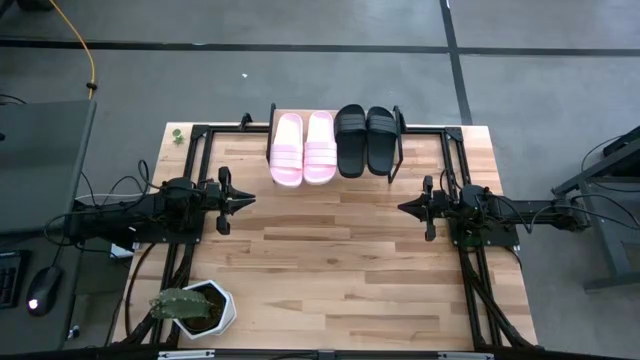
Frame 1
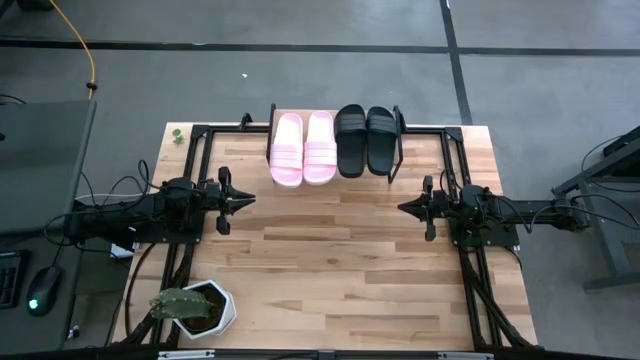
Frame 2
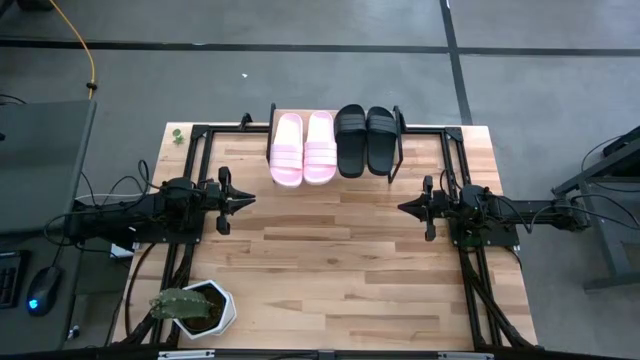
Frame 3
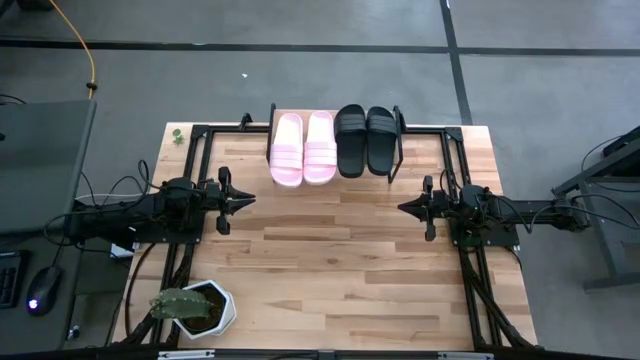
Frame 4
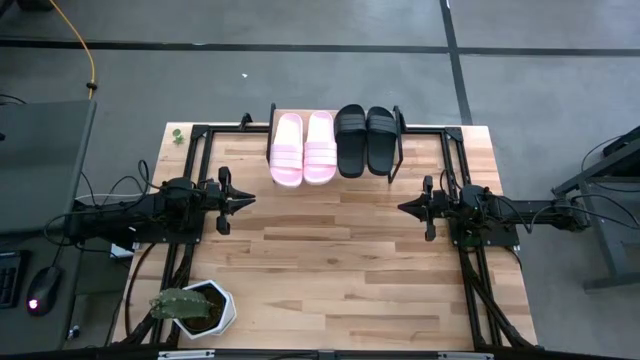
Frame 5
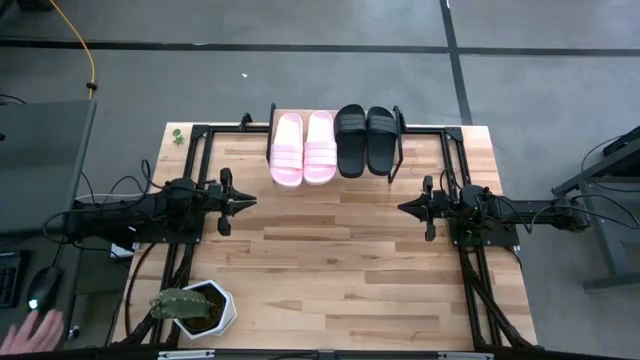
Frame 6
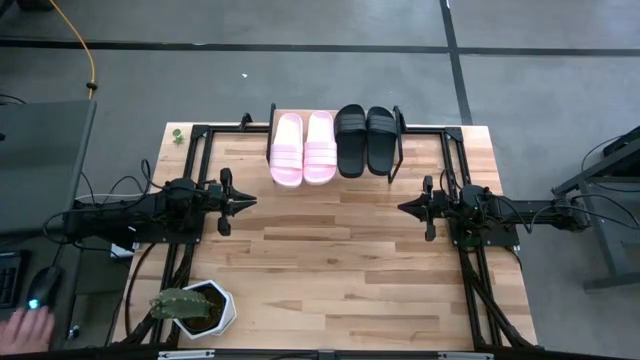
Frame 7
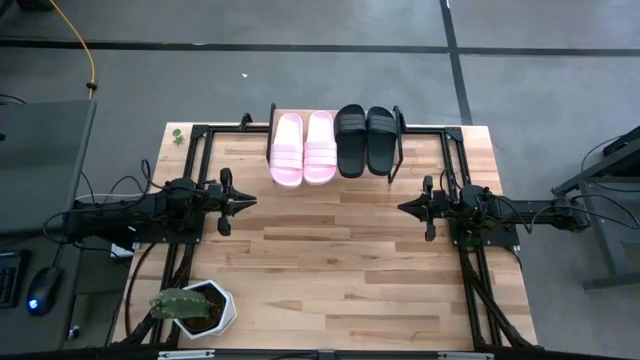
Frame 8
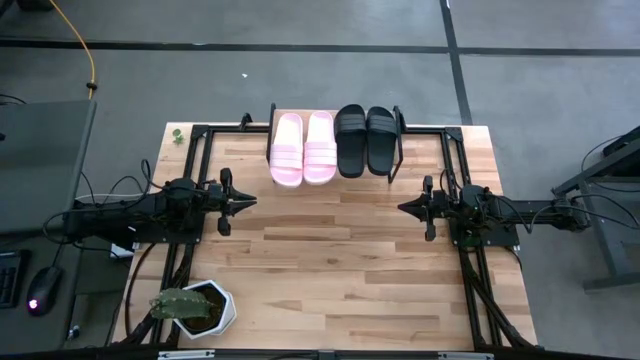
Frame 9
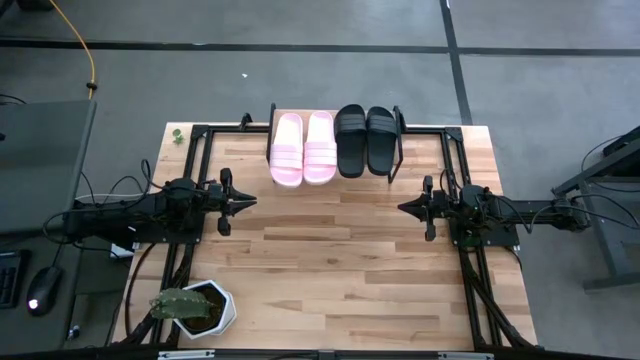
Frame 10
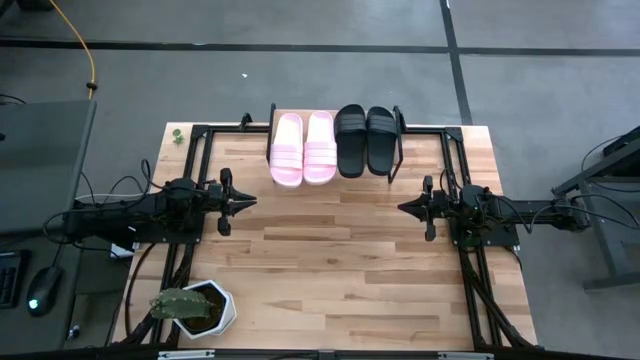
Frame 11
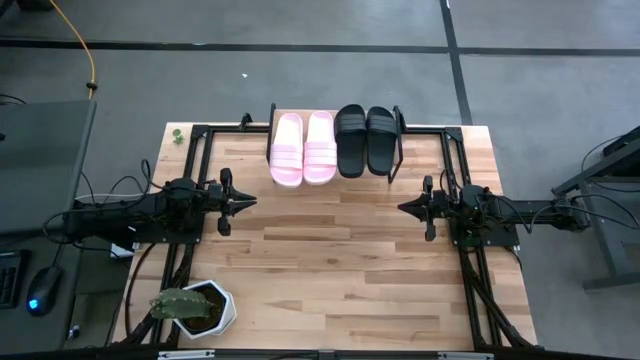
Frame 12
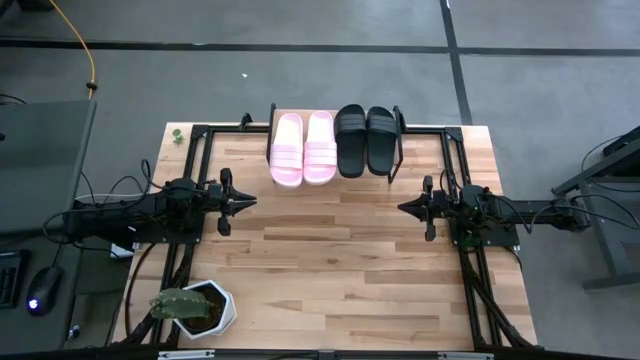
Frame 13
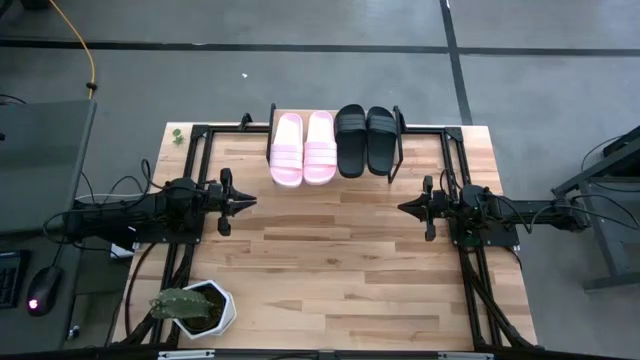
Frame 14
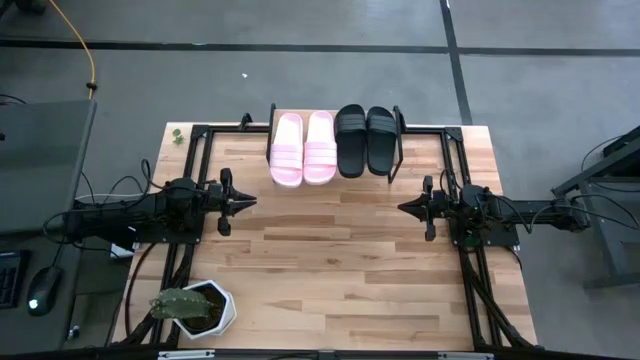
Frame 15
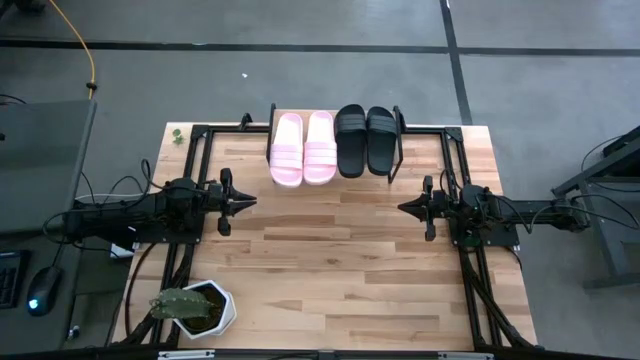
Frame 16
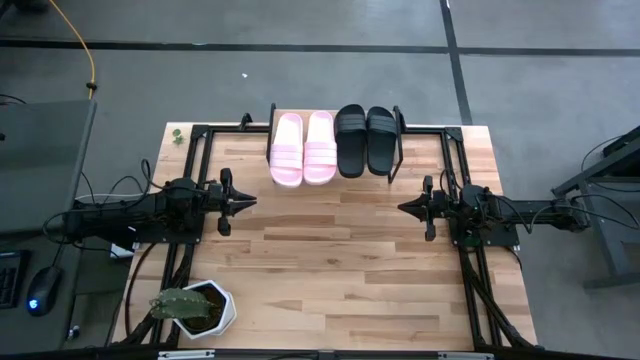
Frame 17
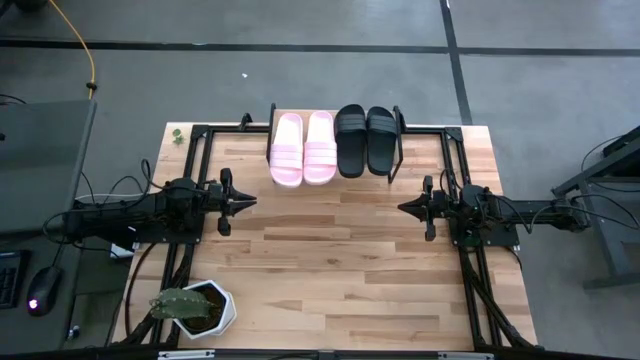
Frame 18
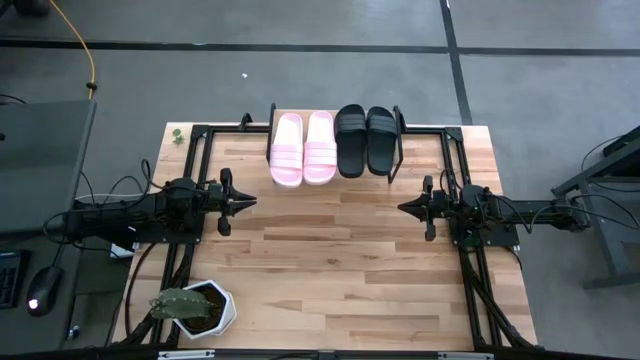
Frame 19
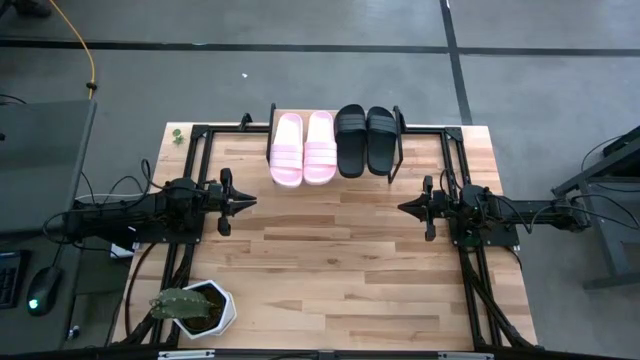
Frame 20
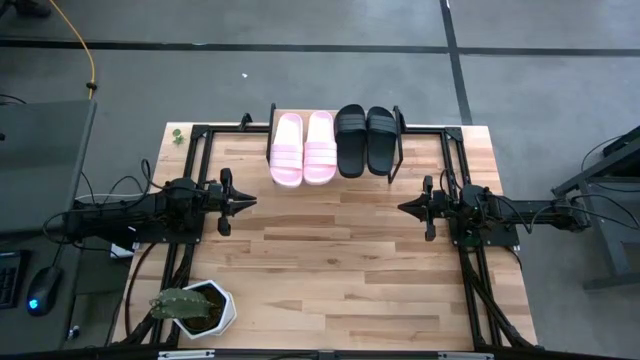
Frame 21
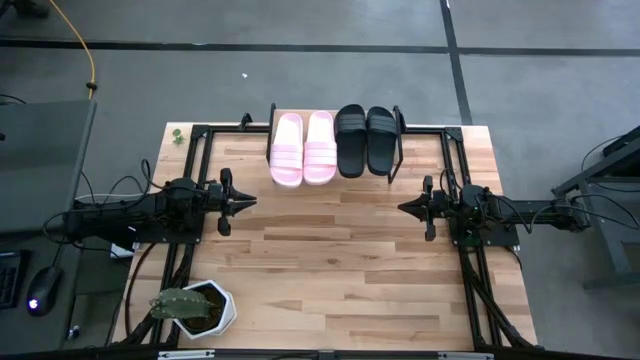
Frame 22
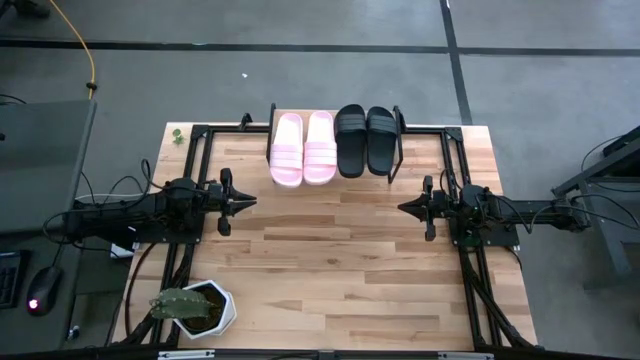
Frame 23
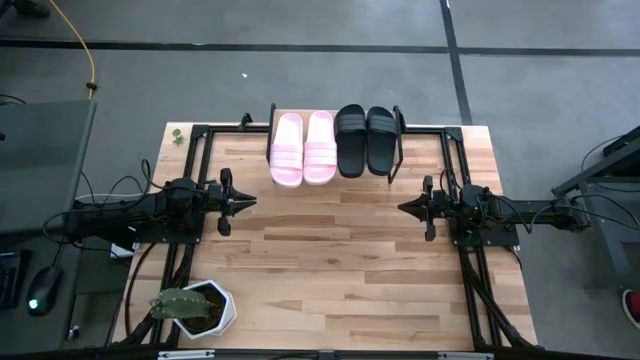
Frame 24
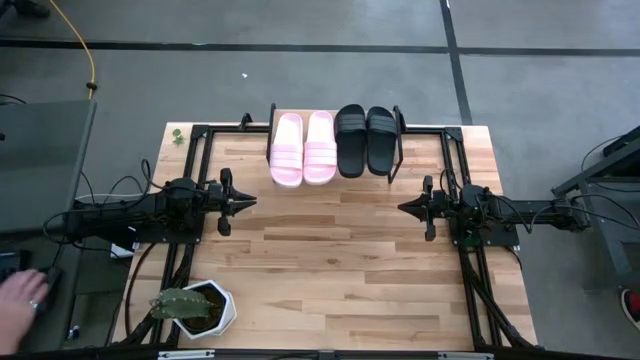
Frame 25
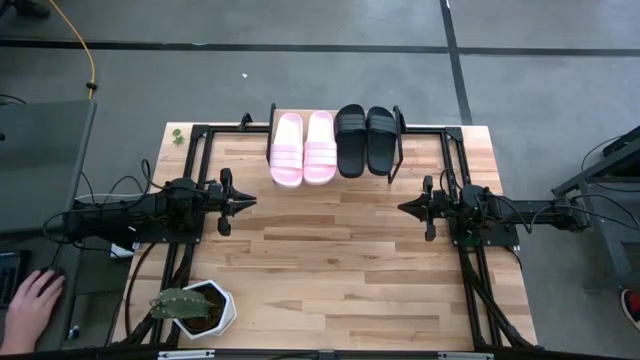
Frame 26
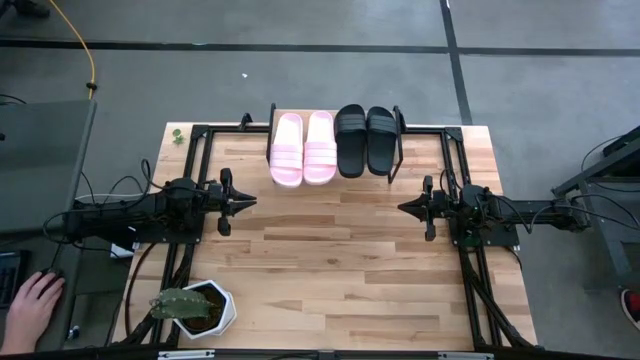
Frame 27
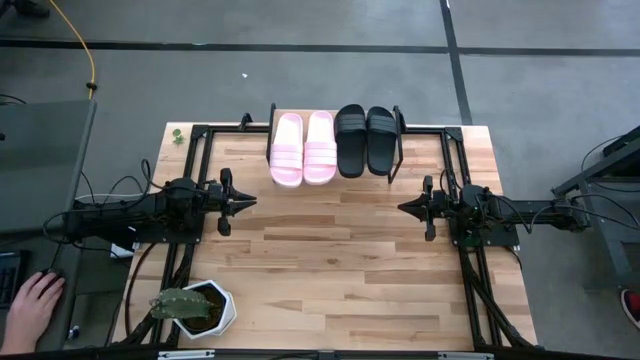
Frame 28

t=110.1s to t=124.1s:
Task: Pick and place slides into the shelf
Return to Home Position

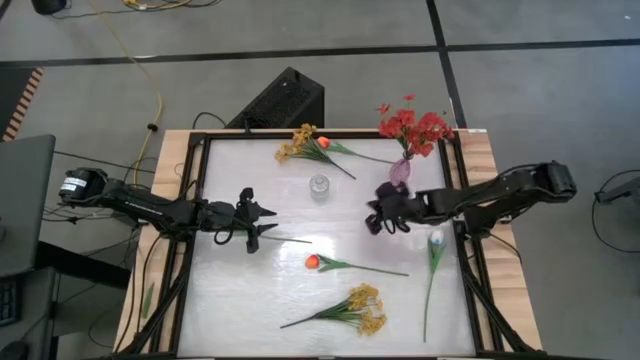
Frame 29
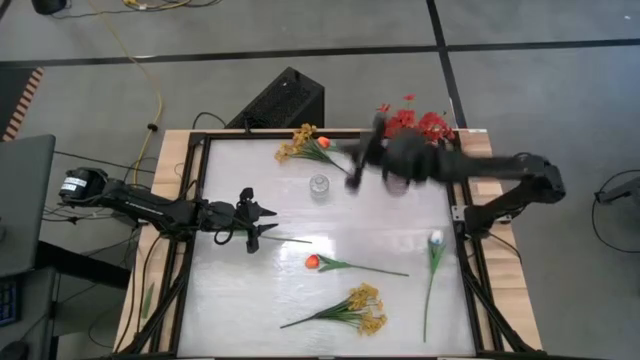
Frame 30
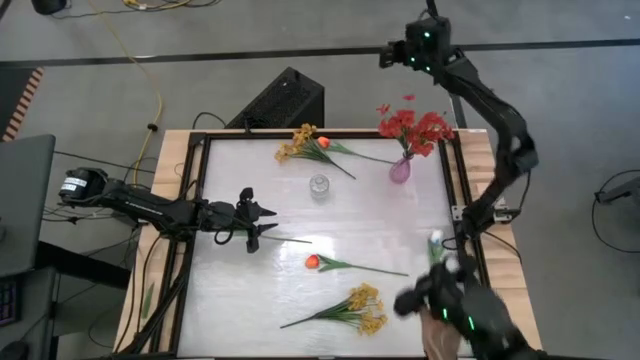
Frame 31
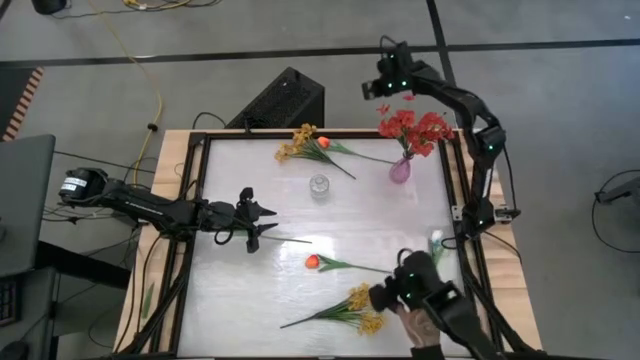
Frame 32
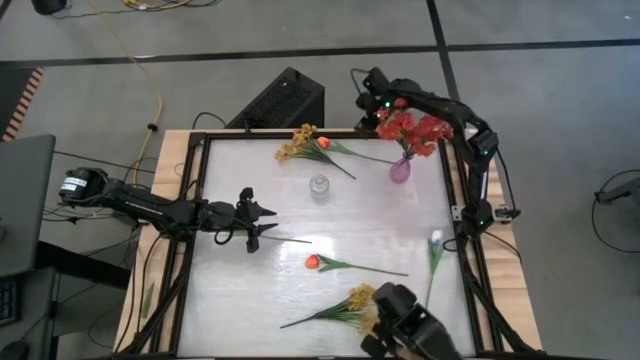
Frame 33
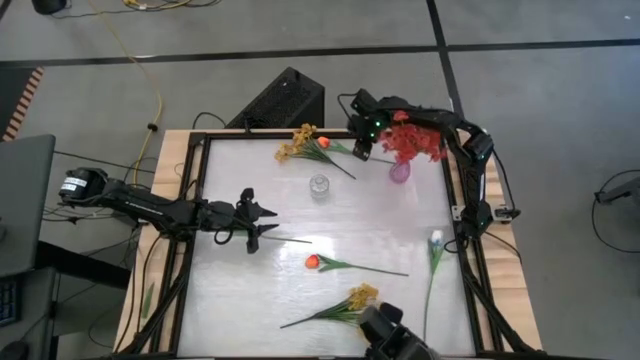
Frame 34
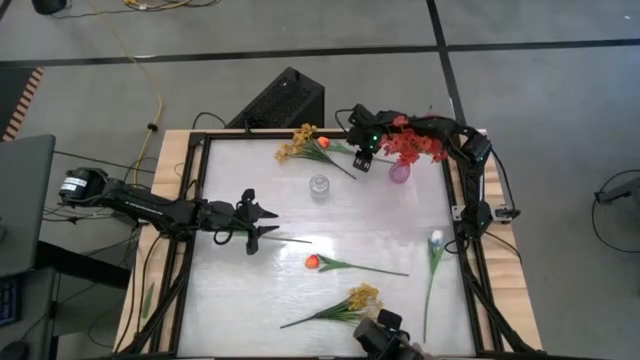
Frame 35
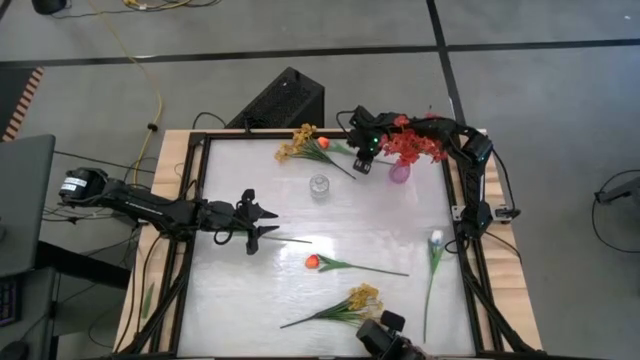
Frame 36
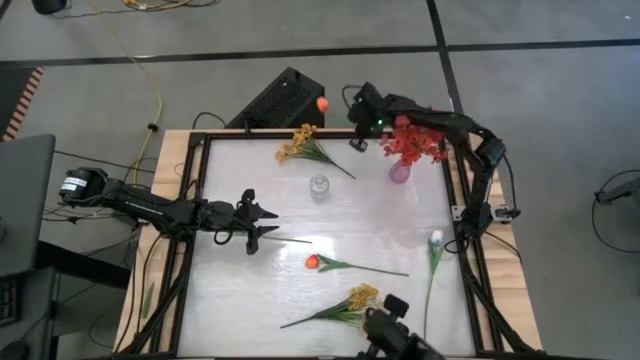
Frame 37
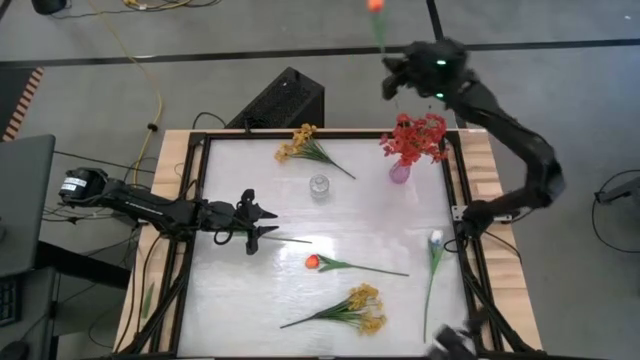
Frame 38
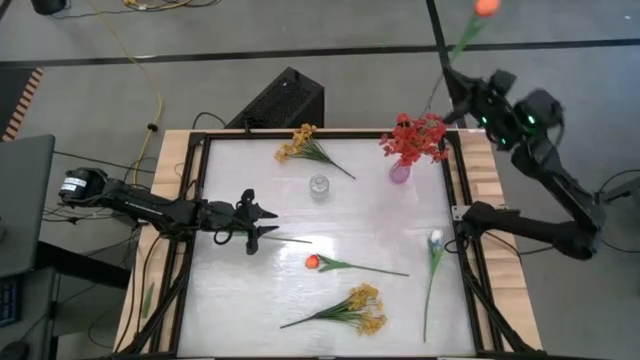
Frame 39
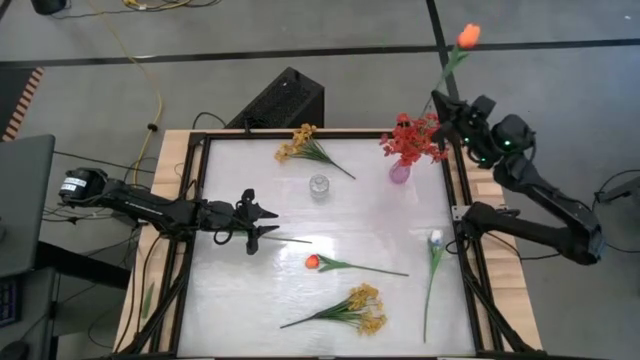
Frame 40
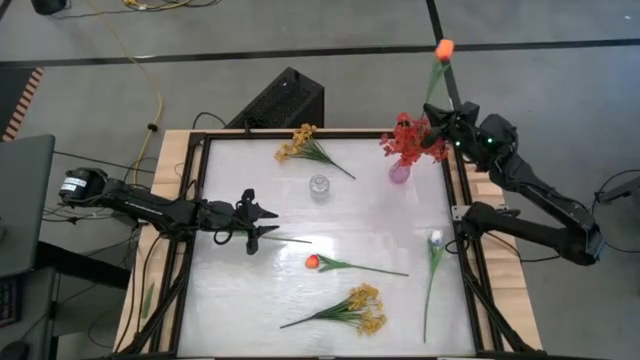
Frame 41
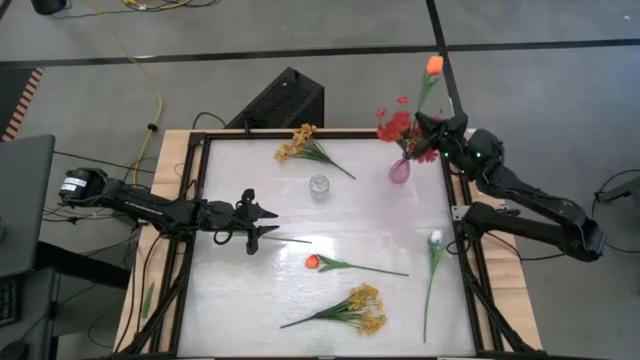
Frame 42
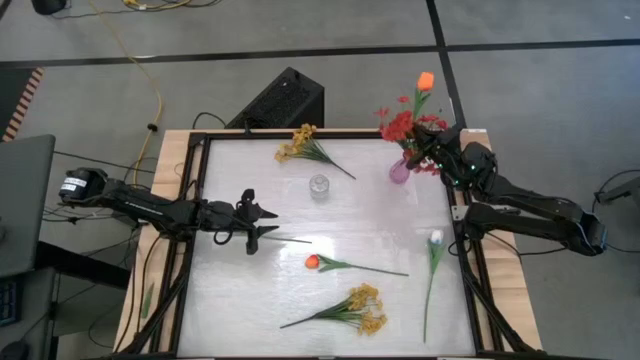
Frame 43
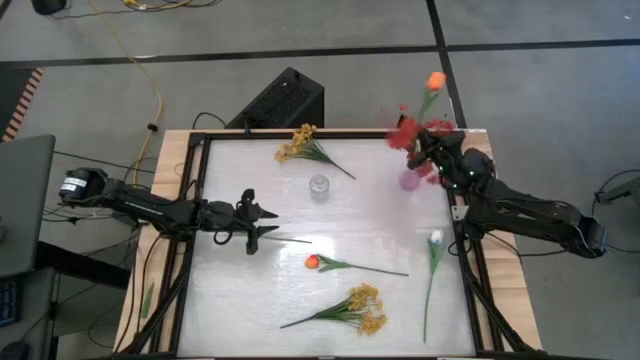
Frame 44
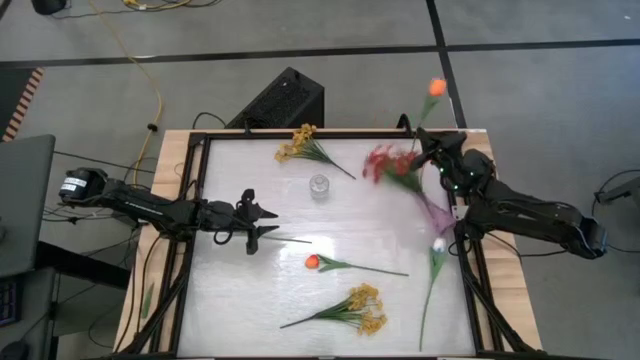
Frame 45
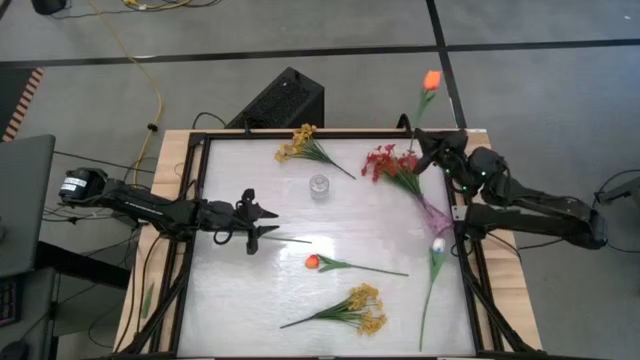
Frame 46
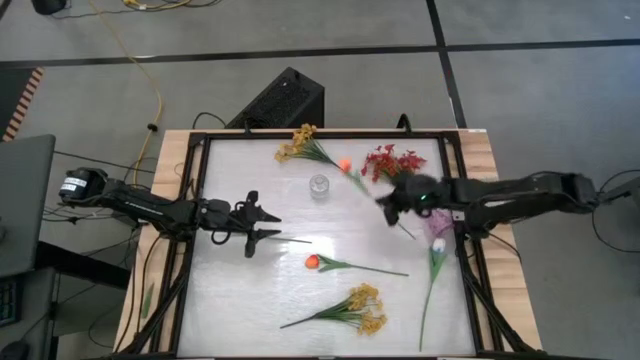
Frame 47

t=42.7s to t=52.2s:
Task: Sort flowers into vase by color
Put the top orange flower into the pink flower vase
